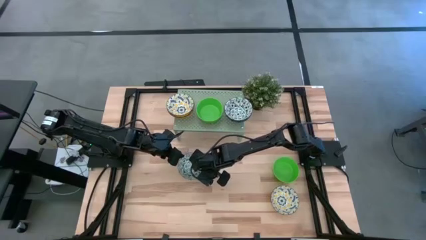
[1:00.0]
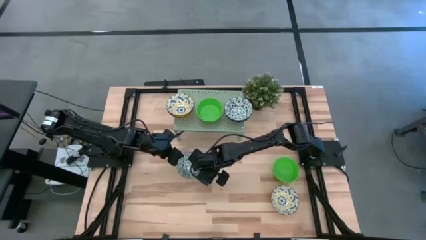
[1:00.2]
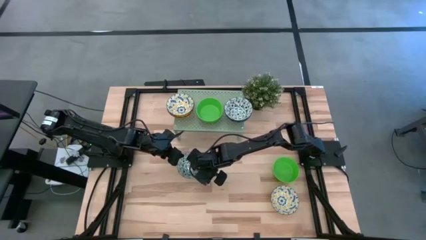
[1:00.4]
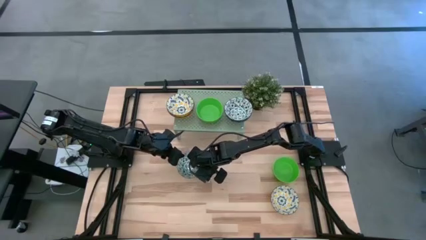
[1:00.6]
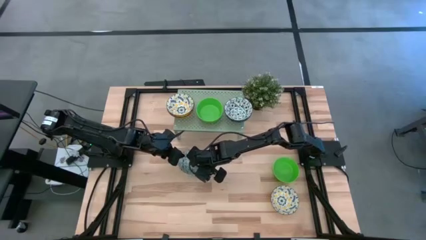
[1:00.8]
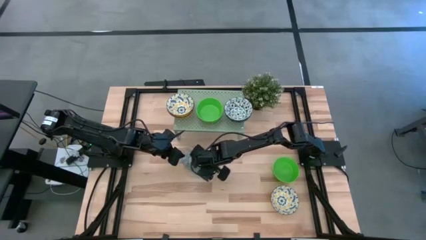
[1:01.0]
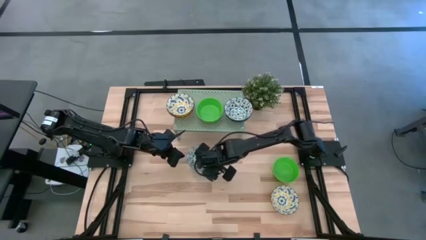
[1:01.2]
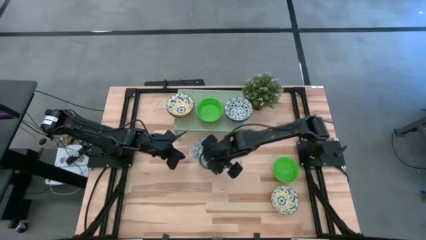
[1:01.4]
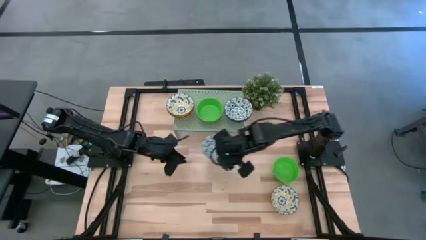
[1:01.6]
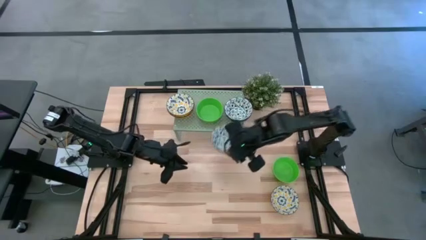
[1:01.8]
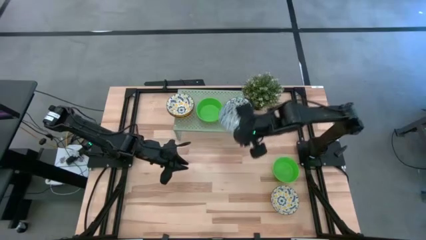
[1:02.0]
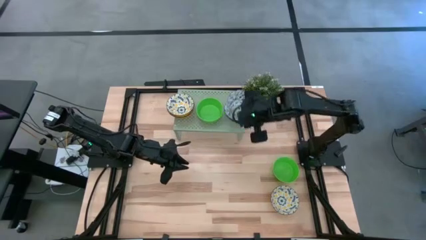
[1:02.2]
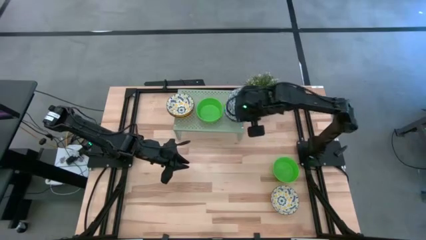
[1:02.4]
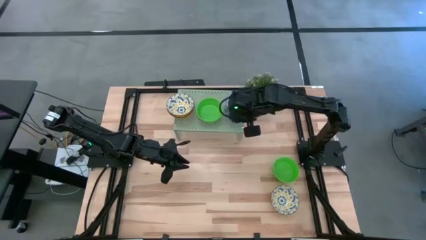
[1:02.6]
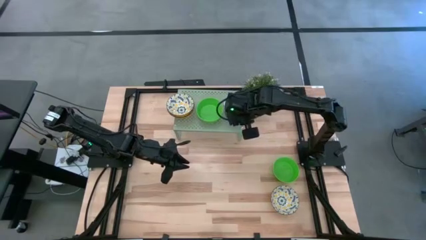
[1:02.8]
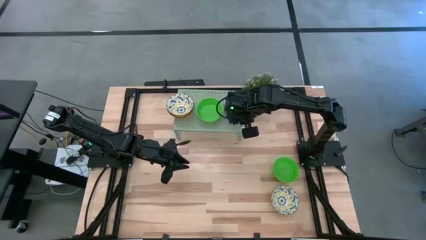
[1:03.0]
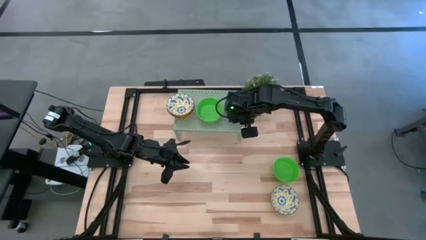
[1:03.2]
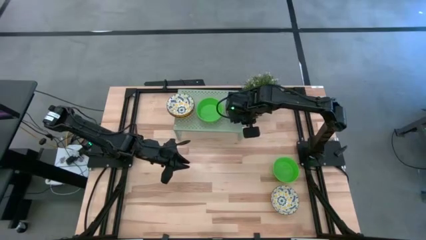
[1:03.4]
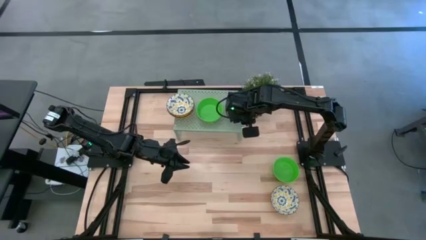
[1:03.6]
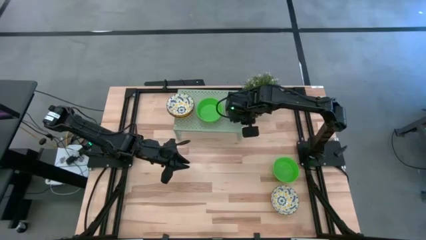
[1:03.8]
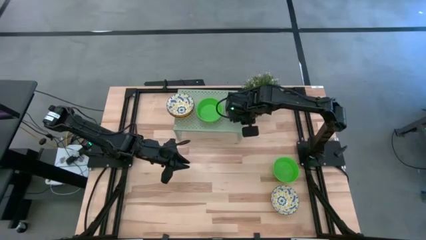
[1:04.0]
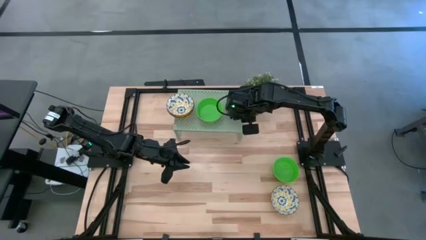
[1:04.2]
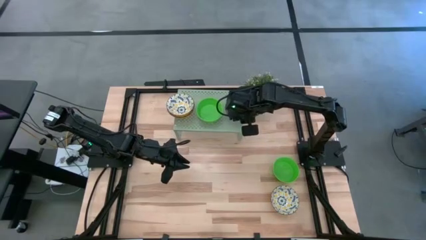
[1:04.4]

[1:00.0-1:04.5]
Task: Pick & Place Mini bowls
Stack the blue and white bowl on top of the blue and white bowl on the shelf

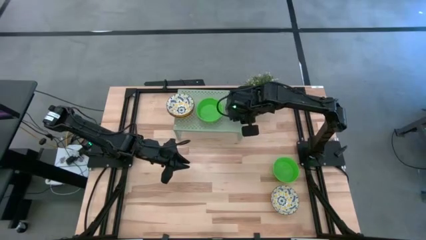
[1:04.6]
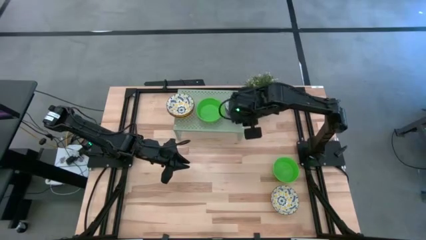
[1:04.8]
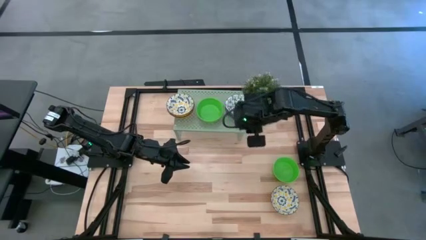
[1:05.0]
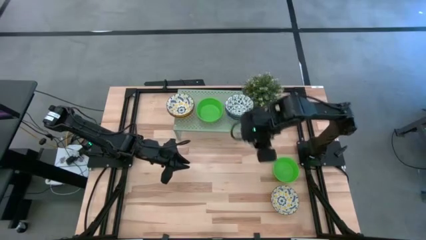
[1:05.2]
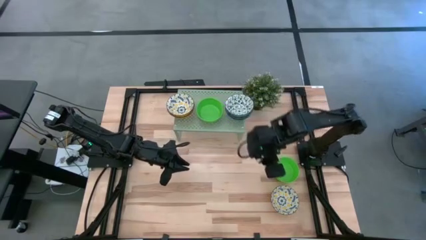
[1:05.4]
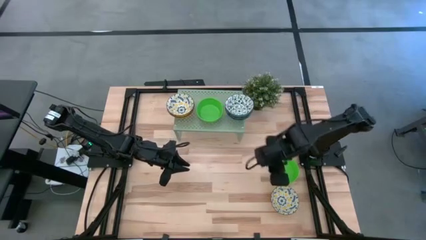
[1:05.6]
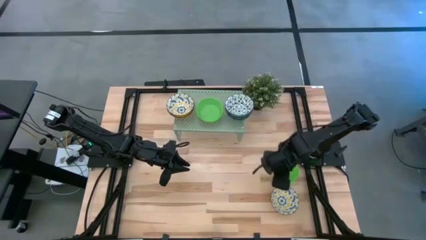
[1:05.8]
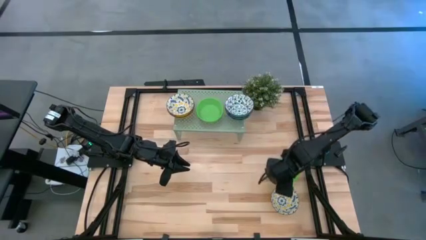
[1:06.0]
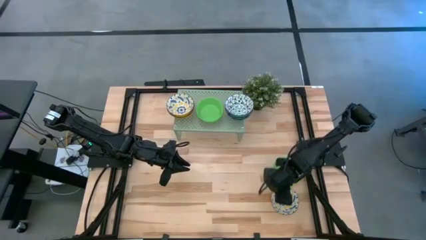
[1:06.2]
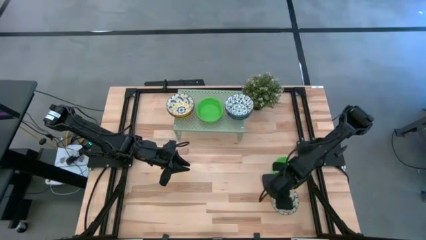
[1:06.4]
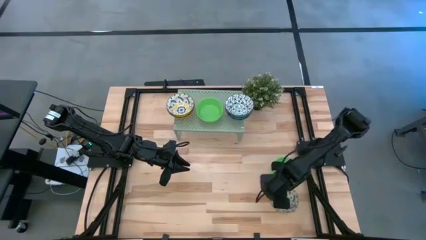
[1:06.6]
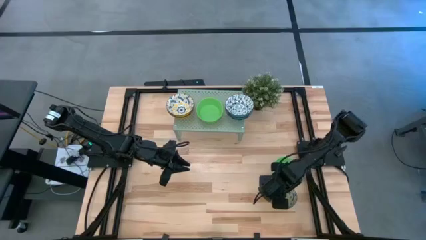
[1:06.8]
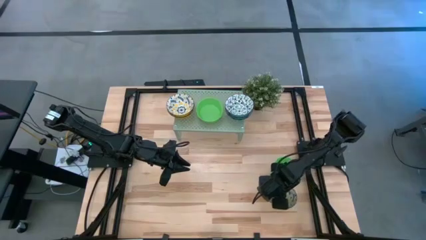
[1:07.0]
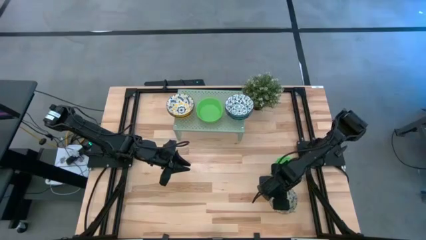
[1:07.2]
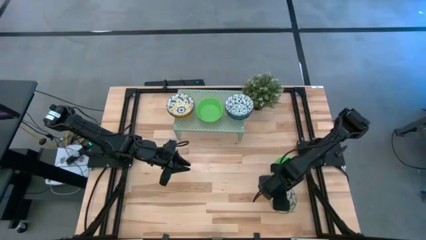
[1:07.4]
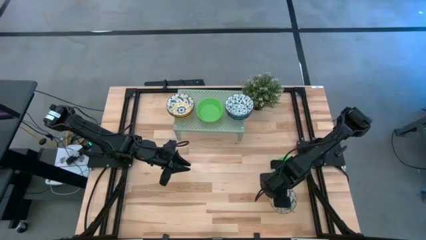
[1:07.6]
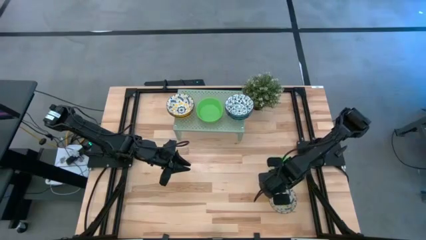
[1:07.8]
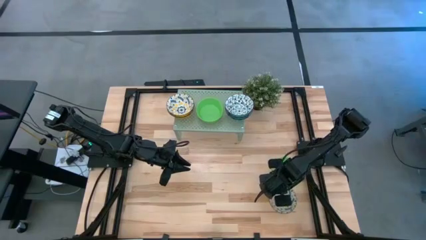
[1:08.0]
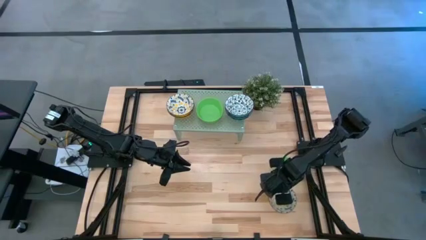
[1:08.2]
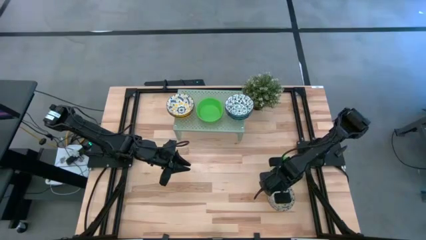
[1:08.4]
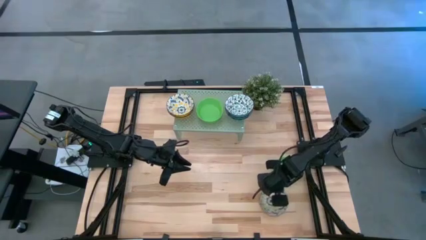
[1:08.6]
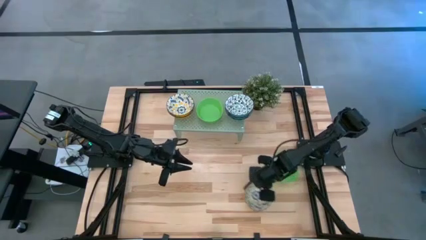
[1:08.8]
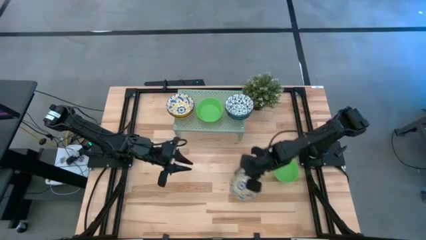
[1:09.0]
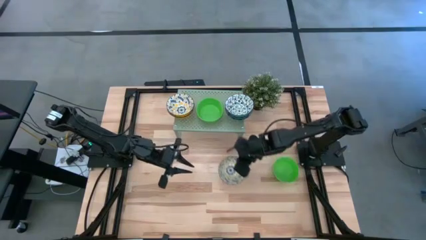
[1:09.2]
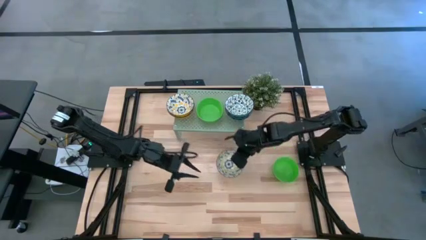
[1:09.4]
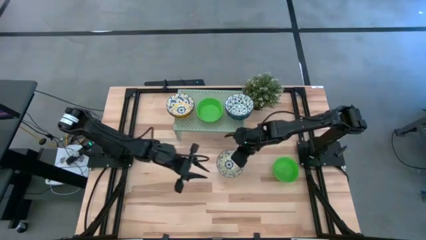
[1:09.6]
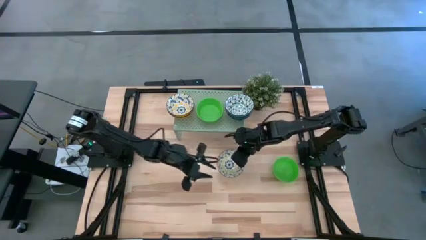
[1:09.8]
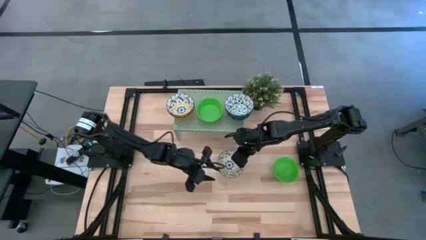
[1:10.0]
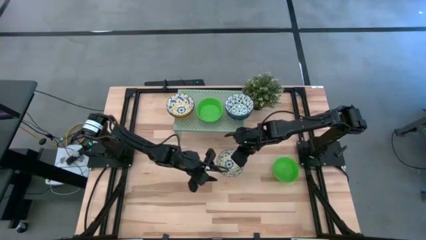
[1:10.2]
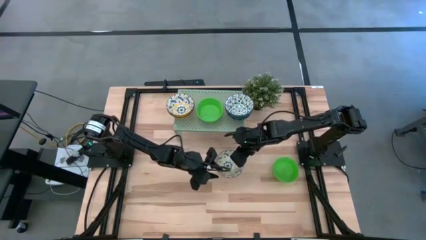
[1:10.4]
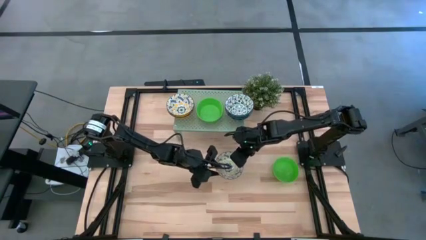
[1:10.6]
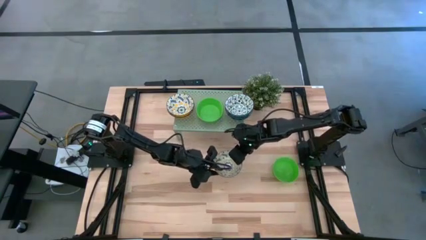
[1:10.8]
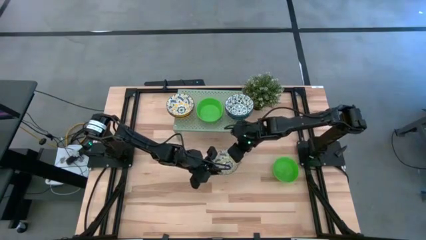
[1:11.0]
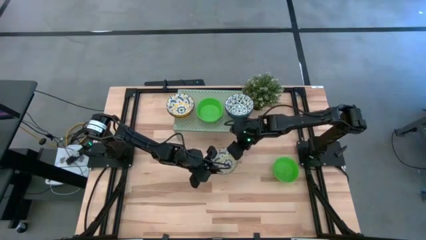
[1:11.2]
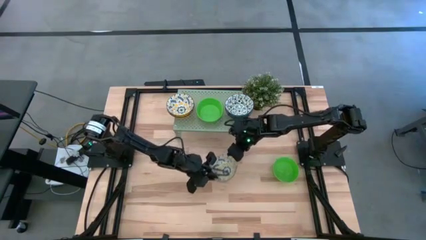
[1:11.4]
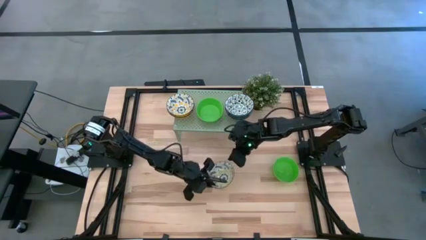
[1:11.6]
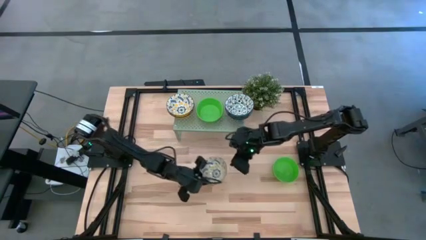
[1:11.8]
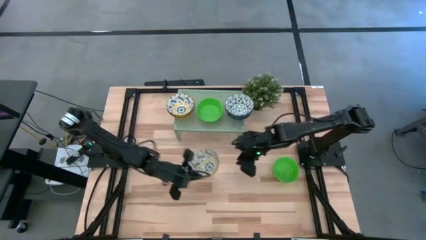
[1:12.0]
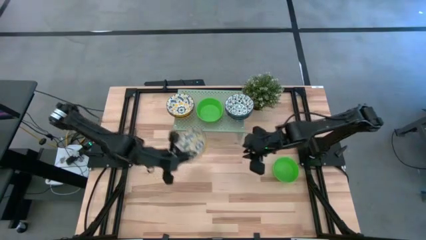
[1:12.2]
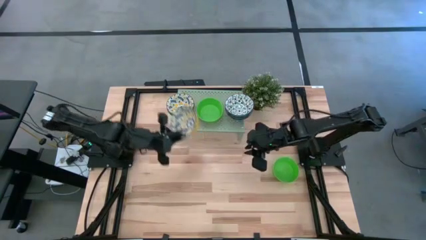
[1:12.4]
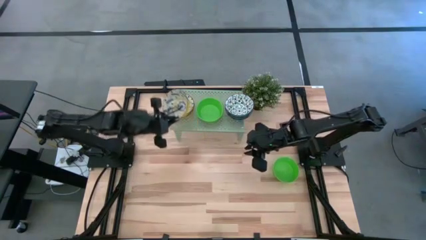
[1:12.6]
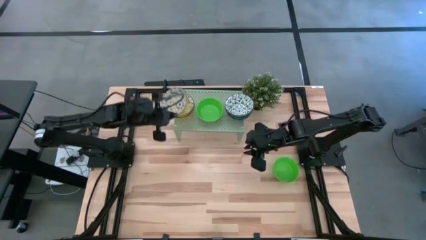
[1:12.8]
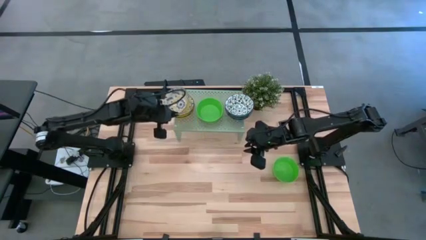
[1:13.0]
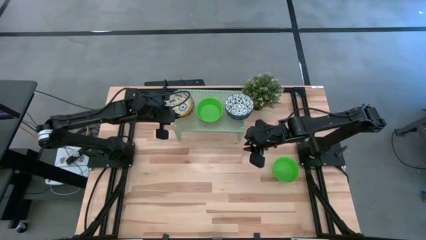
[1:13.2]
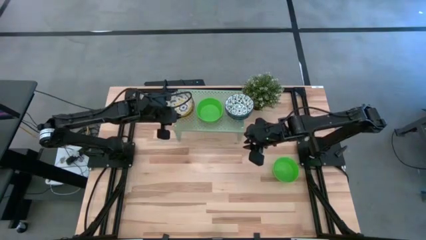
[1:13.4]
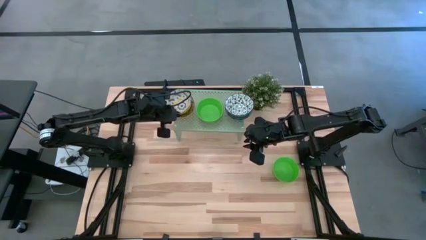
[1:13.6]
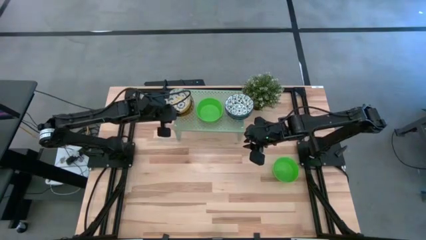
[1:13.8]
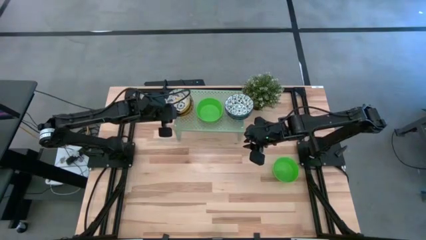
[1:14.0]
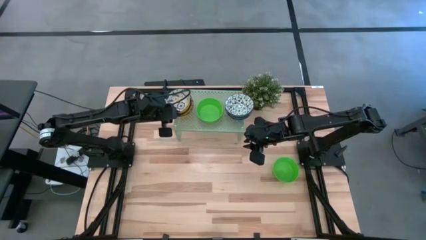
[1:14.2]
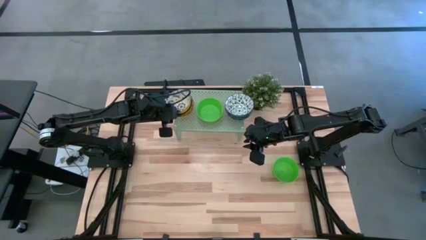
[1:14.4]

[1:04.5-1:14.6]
Stack the yellow and white bowl on top of the yellow and white bowl on the shelf
